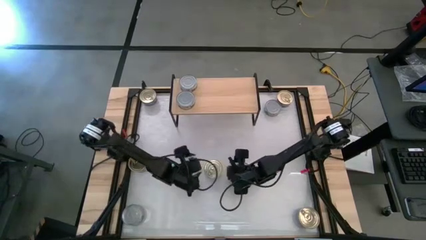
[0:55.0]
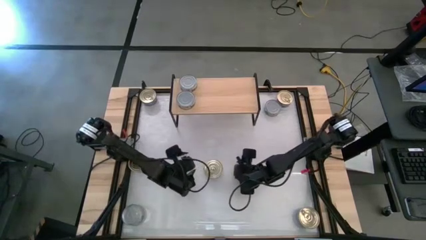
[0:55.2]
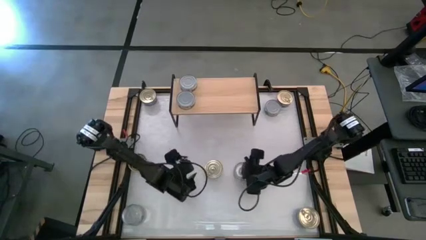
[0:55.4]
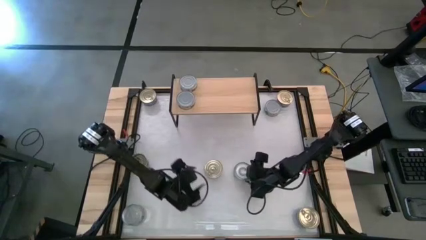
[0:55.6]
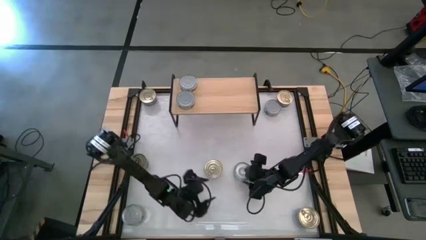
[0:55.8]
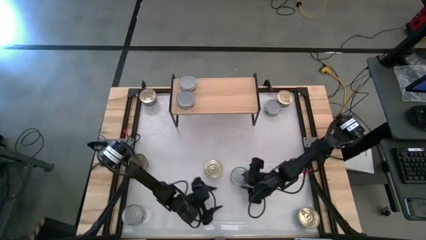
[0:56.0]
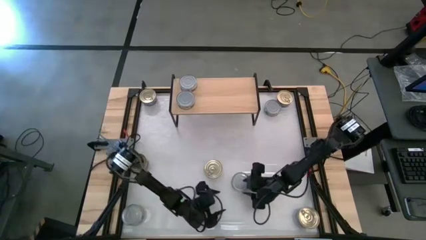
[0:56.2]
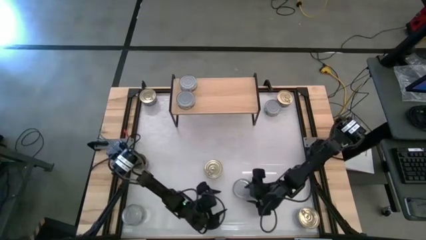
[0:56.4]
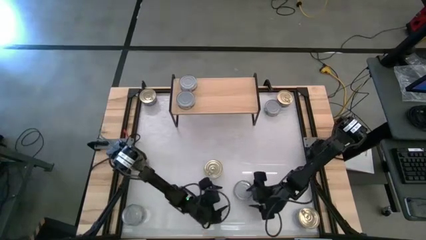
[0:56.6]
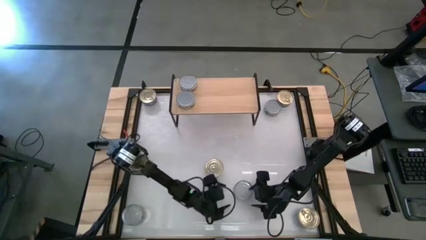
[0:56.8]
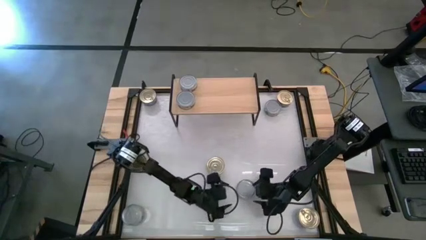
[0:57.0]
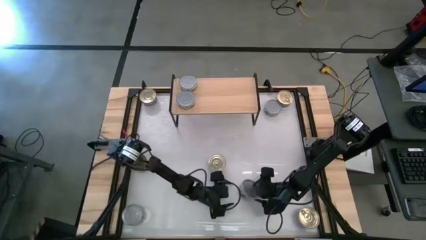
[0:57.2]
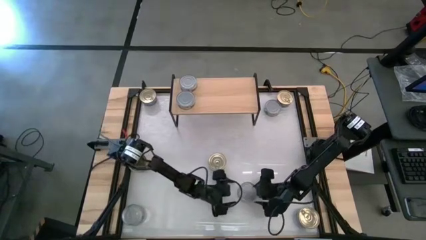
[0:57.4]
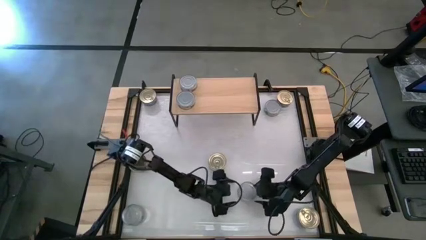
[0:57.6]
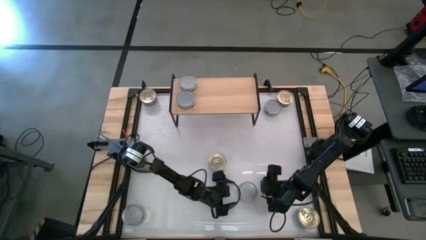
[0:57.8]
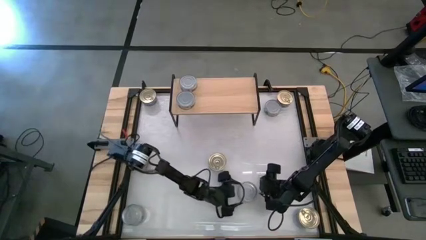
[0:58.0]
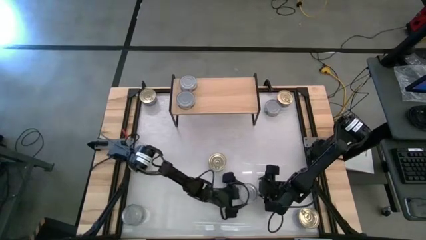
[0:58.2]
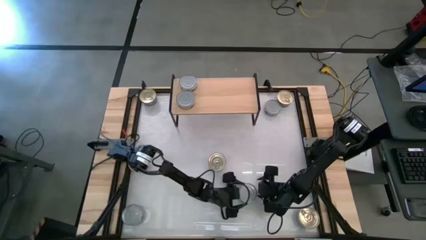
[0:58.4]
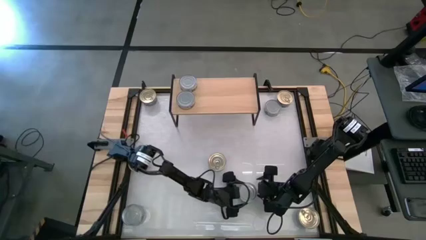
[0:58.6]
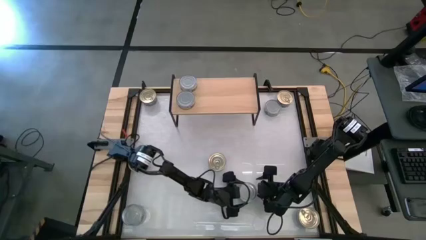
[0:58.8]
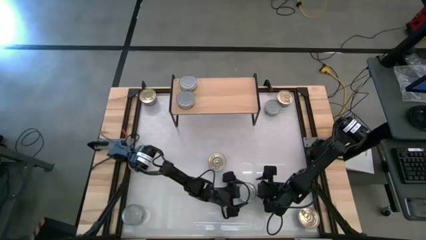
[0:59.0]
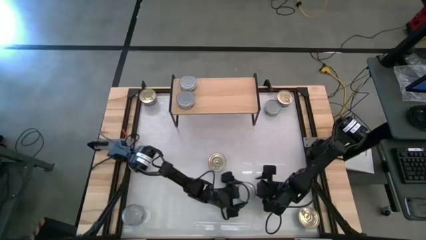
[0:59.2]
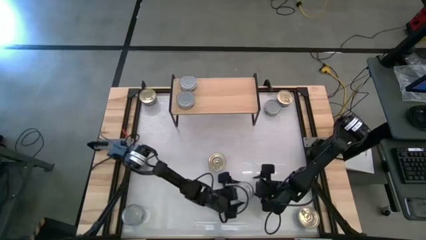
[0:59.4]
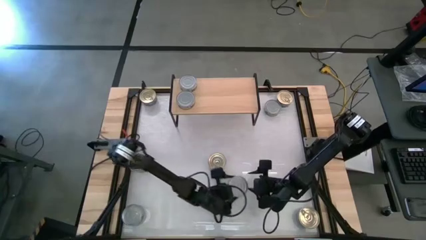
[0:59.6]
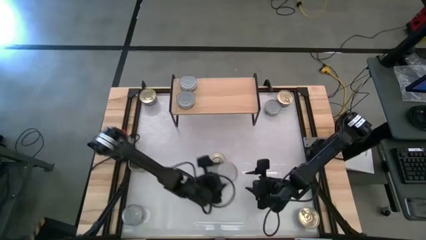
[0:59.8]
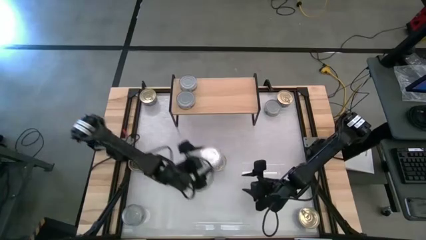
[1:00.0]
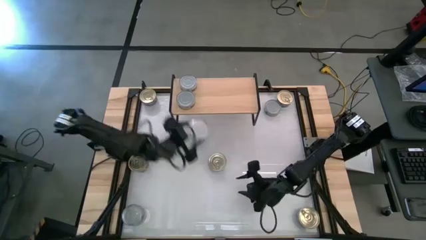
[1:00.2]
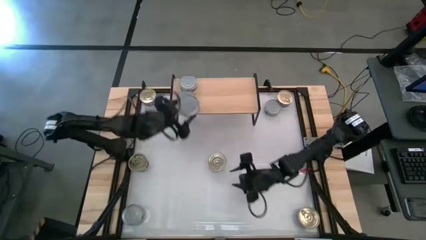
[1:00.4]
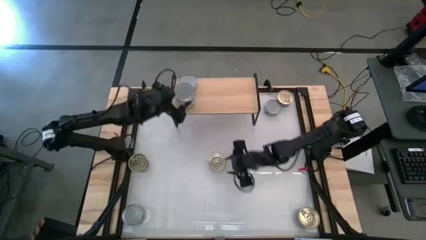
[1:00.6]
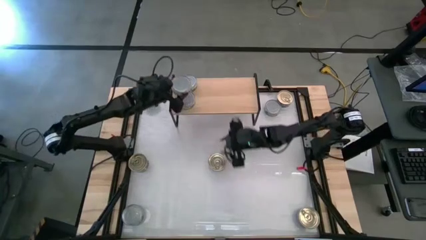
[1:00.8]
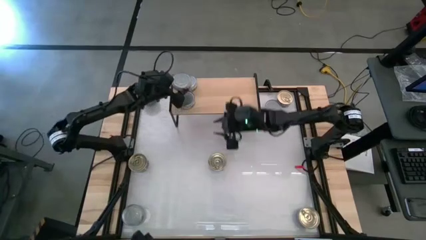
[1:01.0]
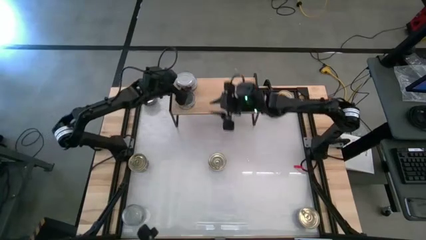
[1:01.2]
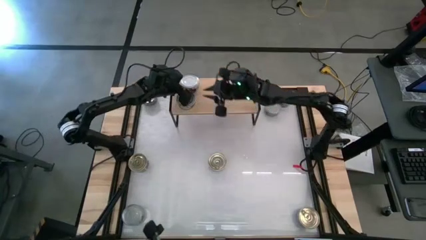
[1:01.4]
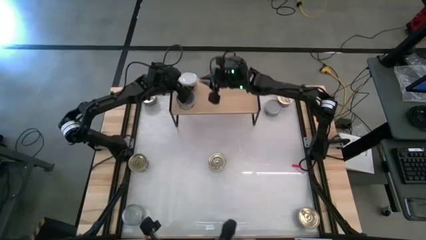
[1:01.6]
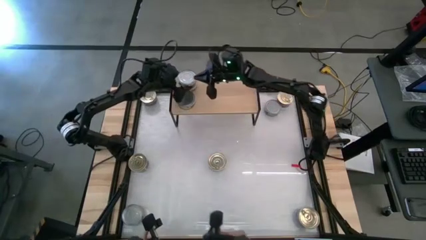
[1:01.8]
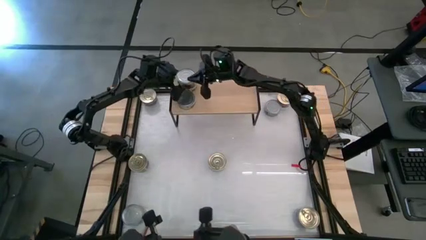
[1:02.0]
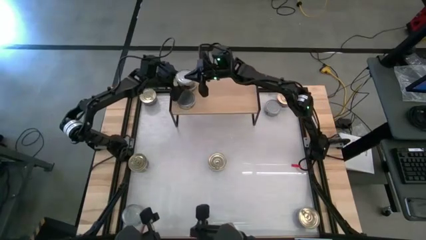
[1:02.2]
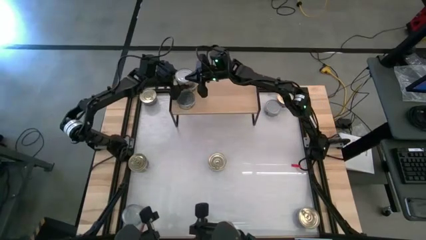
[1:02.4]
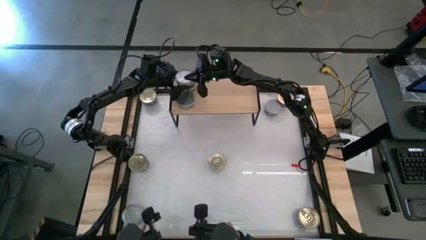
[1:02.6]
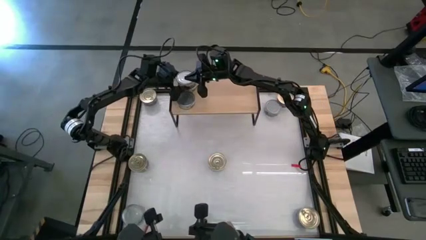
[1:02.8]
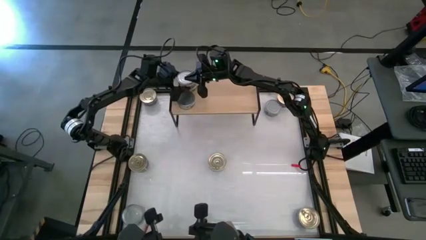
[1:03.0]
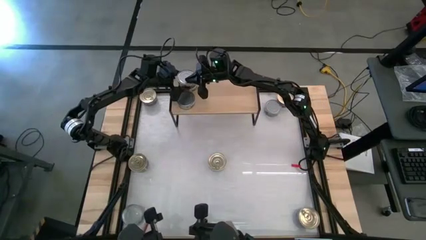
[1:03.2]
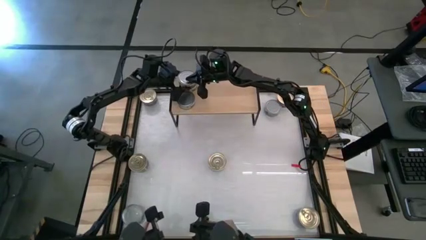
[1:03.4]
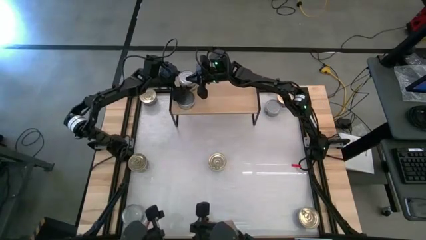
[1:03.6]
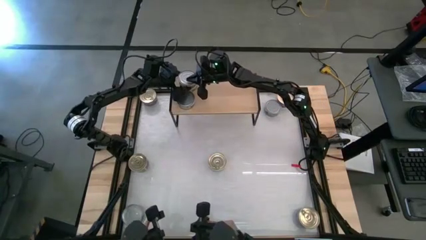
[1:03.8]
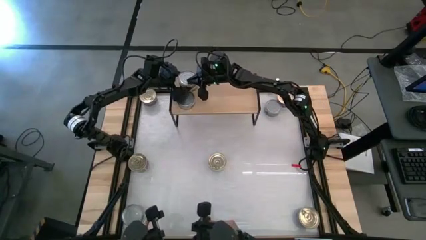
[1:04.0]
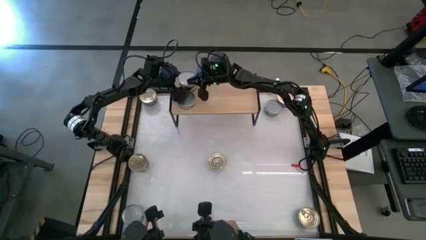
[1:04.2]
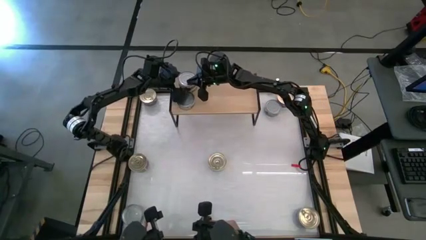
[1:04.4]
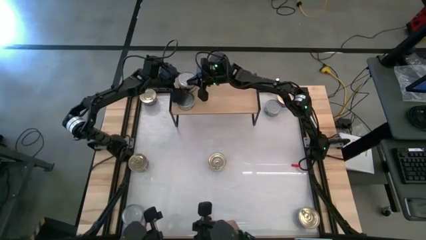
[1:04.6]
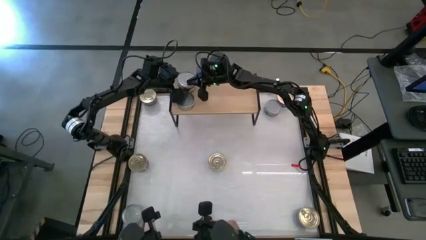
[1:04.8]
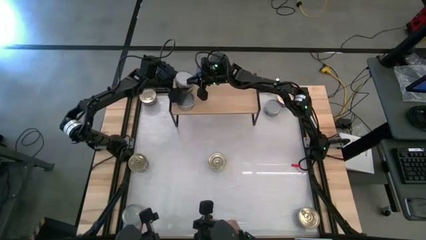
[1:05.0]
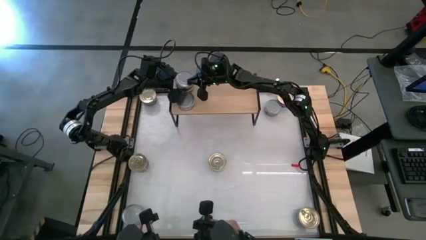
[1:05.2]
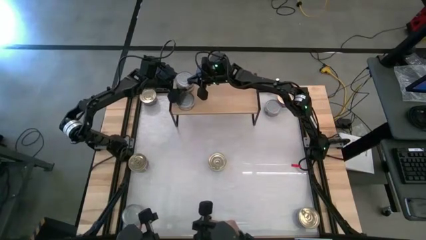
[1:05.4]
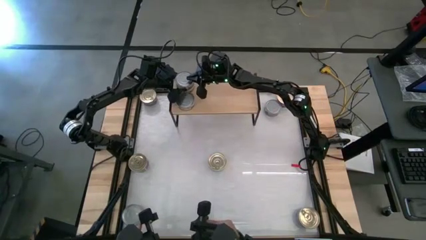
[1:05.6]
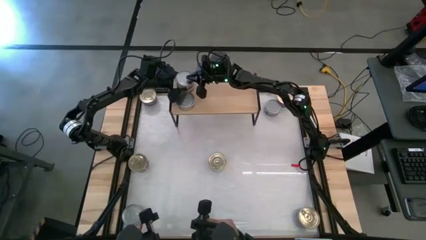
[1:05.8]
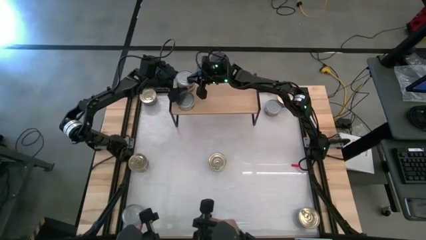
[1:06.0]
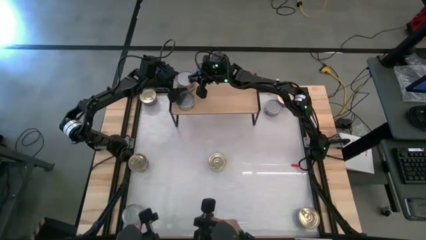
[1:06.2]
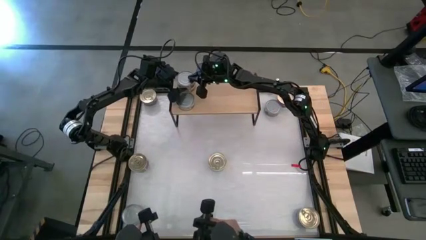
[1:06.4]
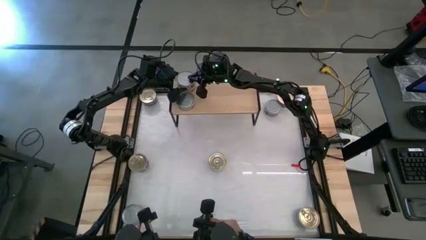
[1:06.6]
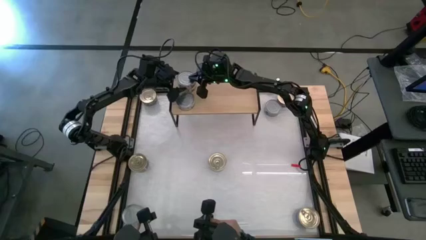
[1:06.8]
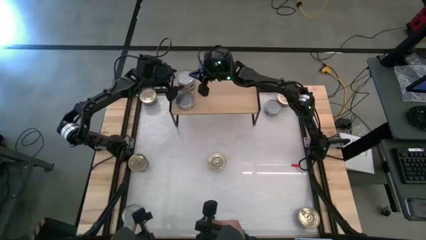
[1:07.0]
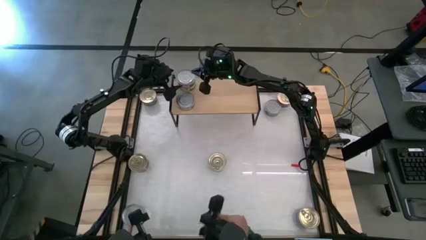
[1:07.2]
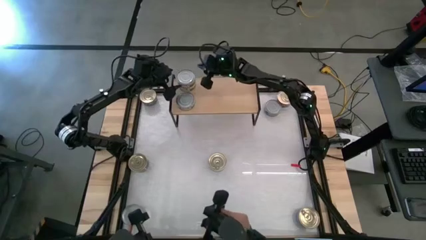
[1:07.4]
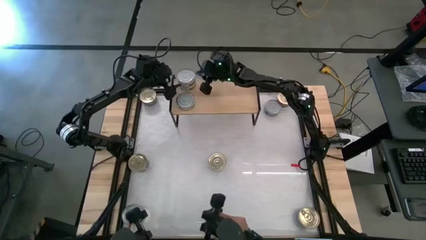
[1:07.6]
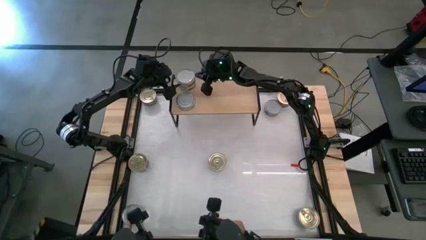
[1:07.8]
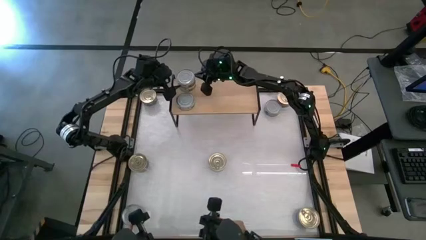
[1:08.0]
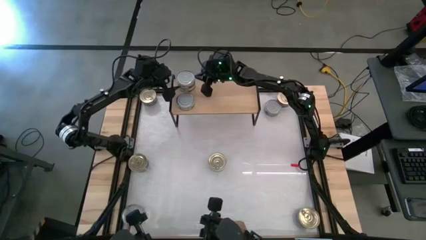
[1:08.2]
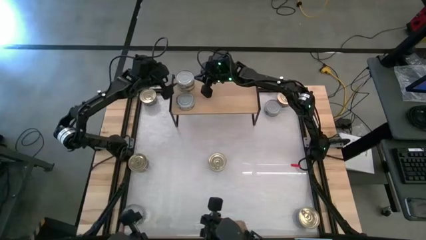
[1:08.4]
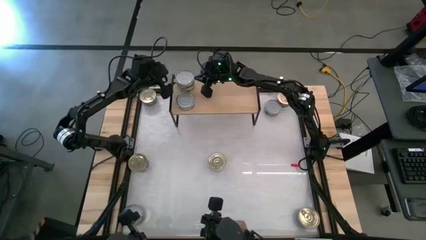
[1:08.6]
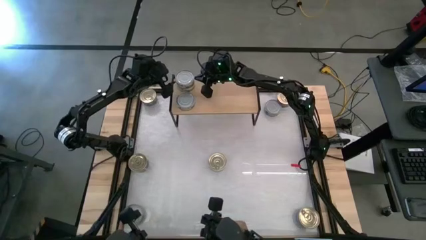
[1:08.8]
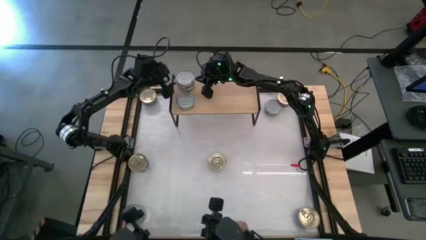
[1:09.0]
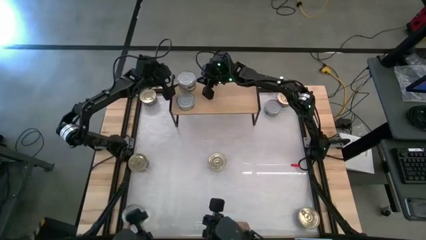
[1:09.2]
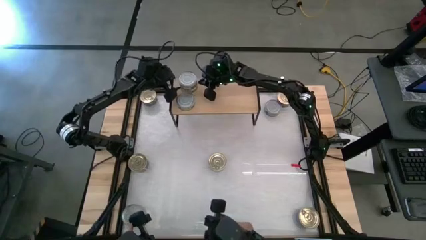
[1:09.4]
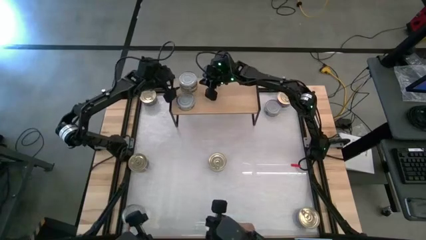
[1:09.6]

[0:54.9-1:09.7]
Task: Stack canned seafood by type on shelf
Stack the green tuna can on top of the green tuna can on the shelf
